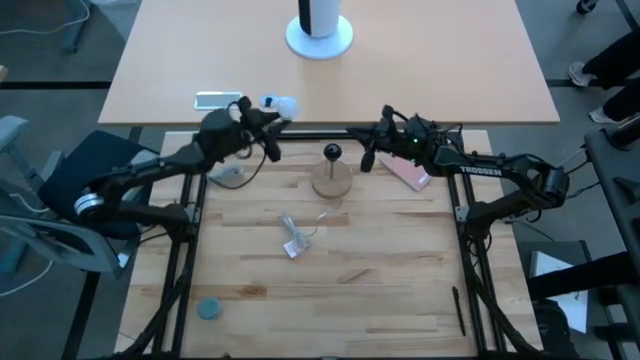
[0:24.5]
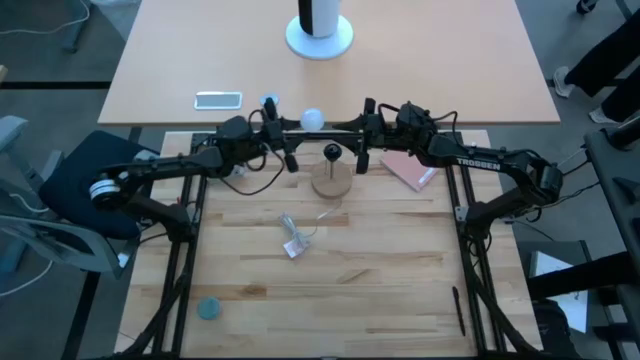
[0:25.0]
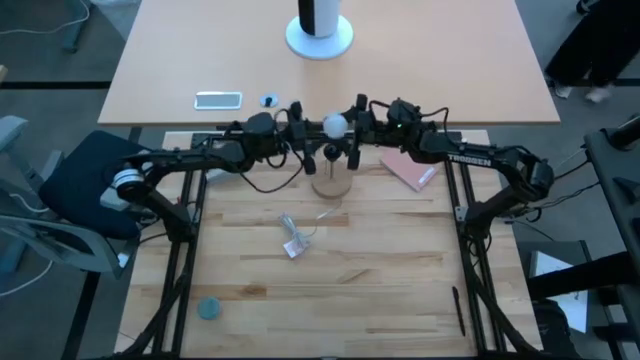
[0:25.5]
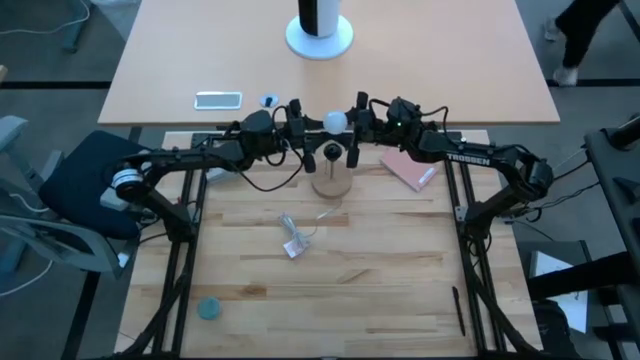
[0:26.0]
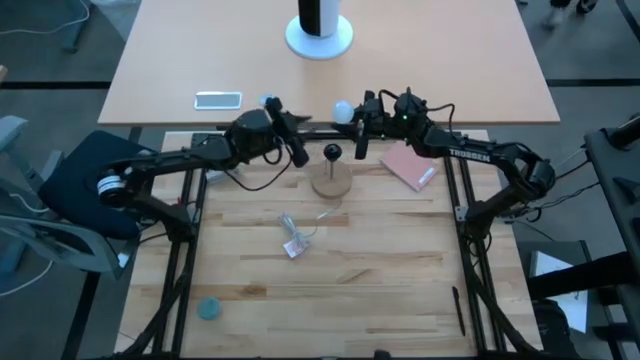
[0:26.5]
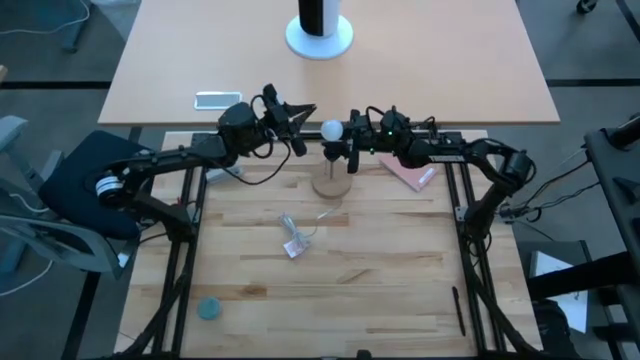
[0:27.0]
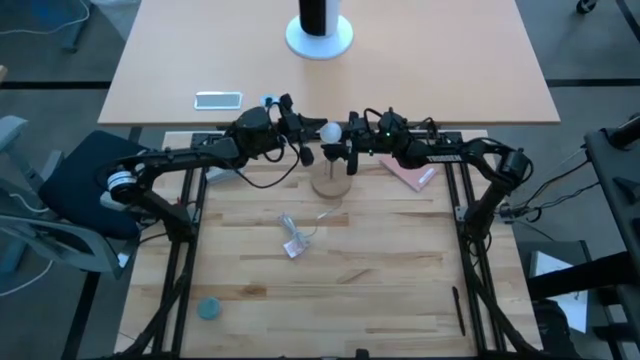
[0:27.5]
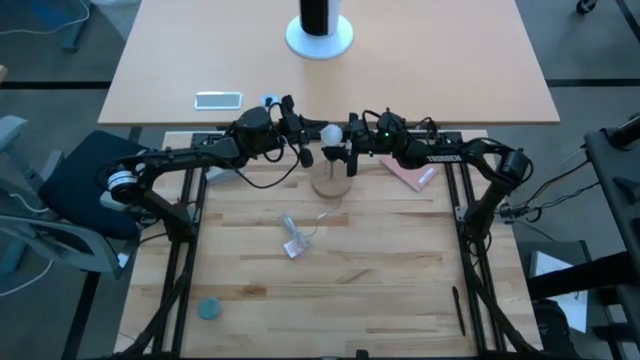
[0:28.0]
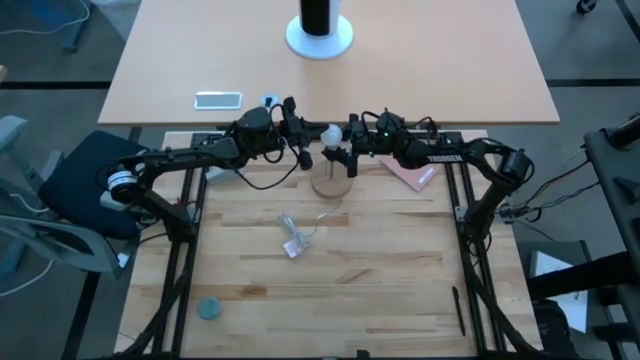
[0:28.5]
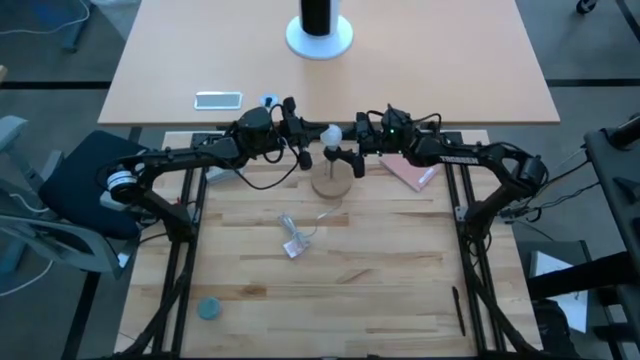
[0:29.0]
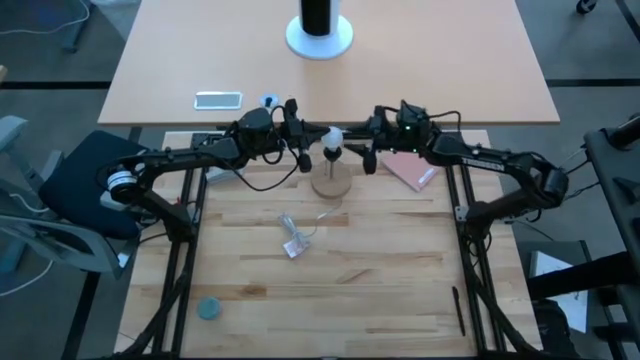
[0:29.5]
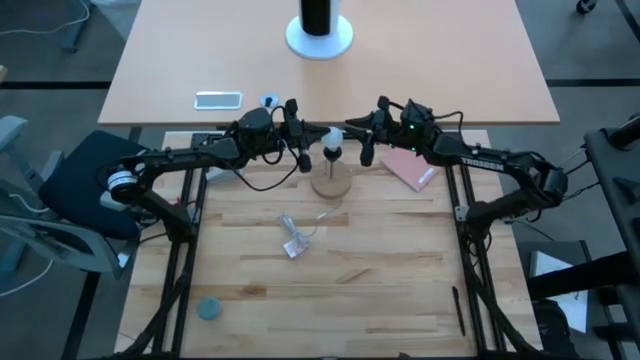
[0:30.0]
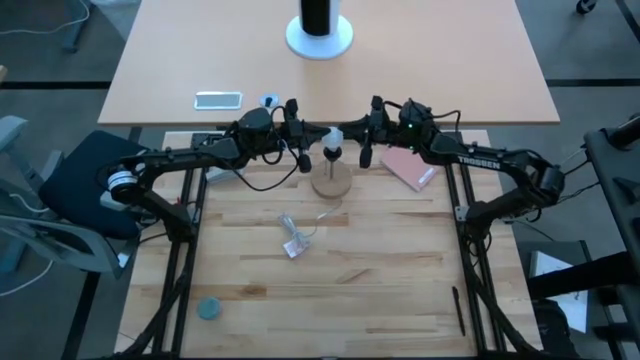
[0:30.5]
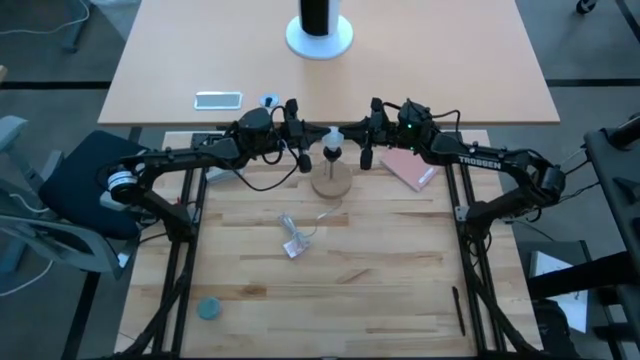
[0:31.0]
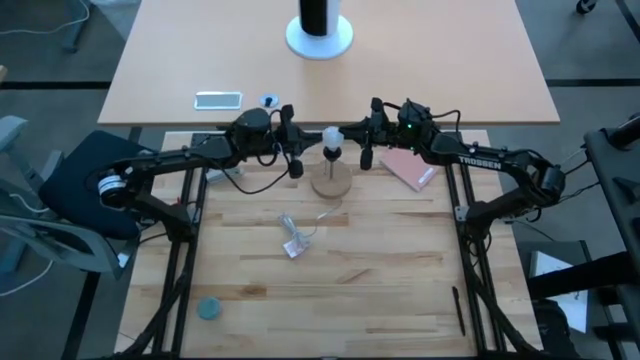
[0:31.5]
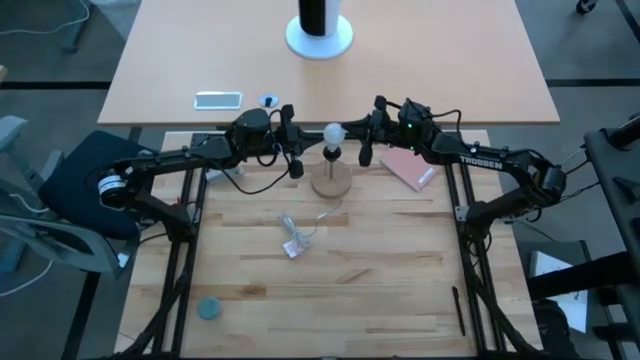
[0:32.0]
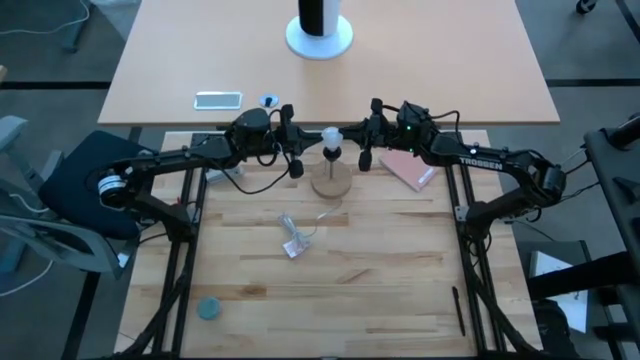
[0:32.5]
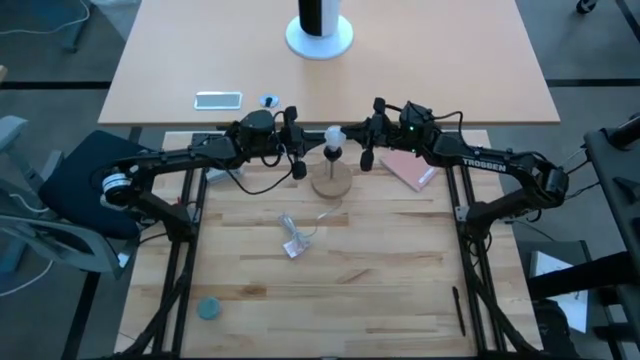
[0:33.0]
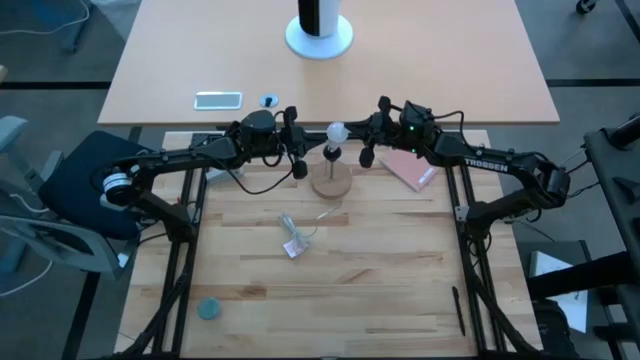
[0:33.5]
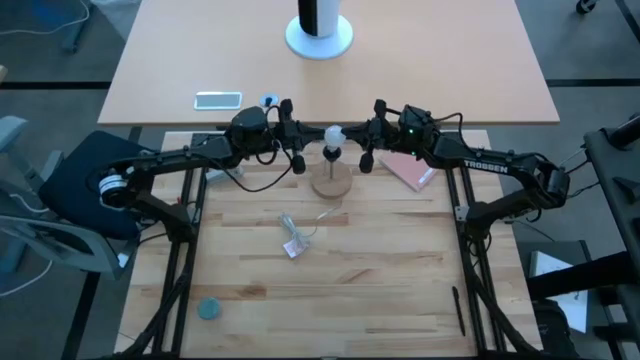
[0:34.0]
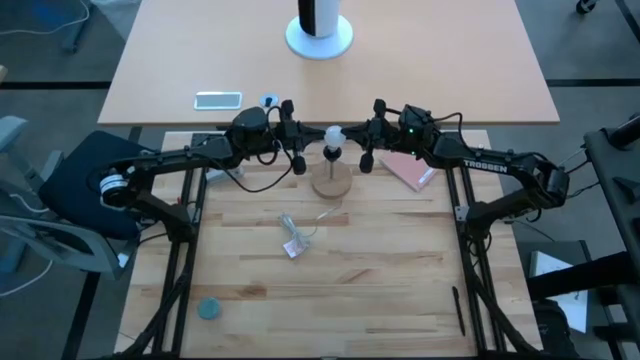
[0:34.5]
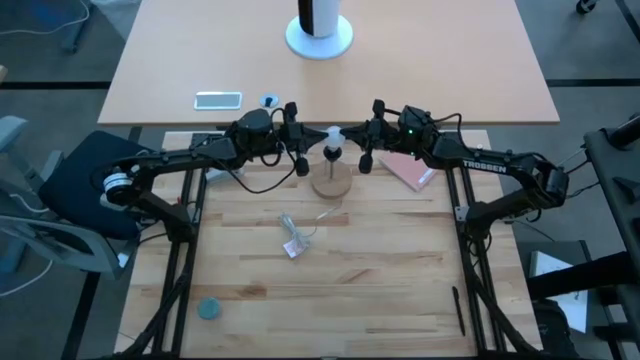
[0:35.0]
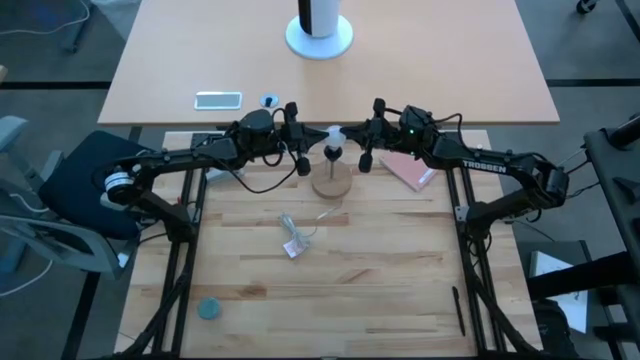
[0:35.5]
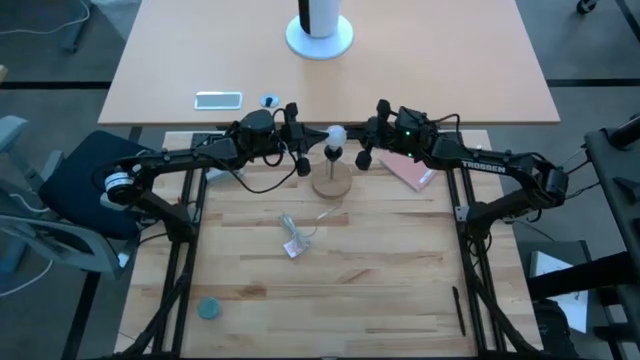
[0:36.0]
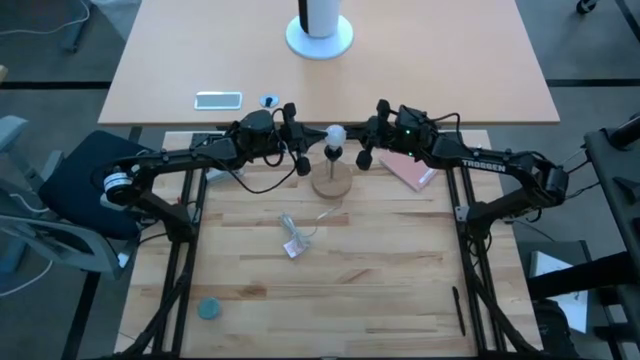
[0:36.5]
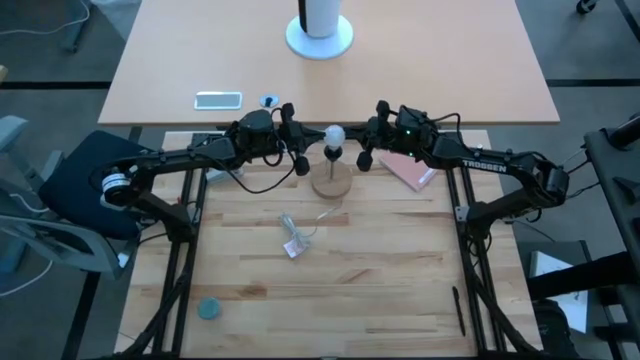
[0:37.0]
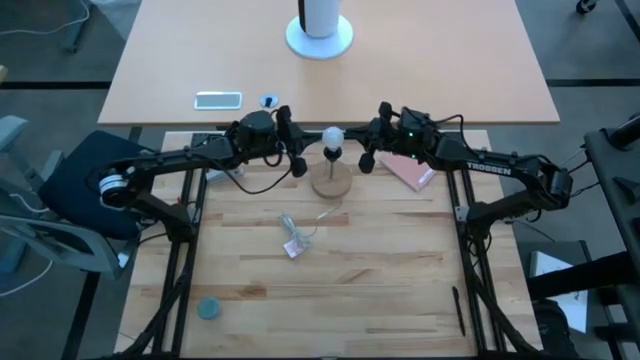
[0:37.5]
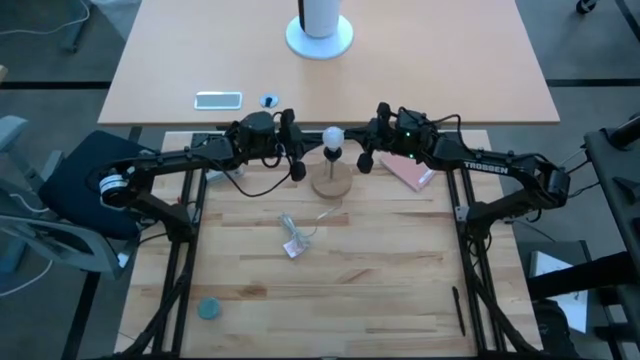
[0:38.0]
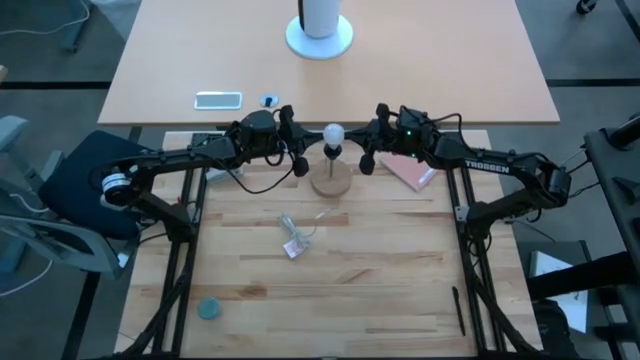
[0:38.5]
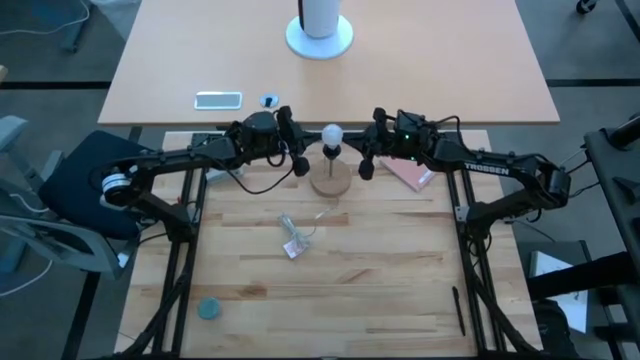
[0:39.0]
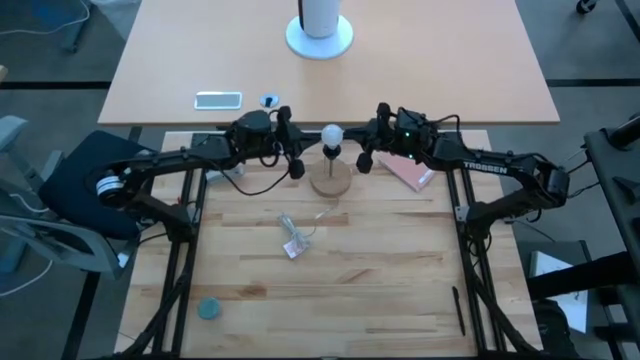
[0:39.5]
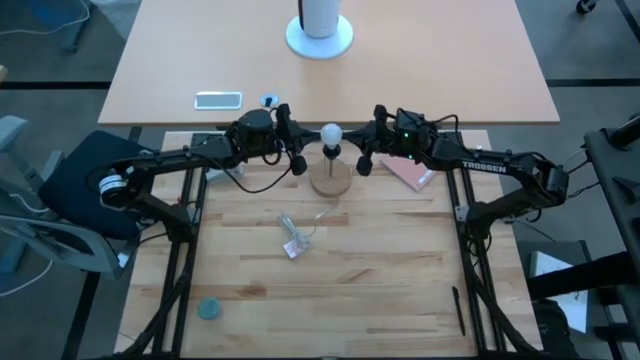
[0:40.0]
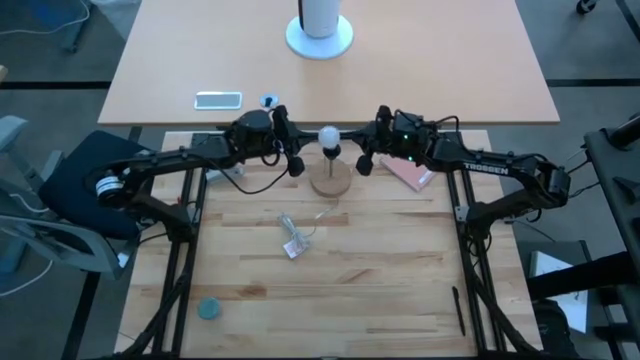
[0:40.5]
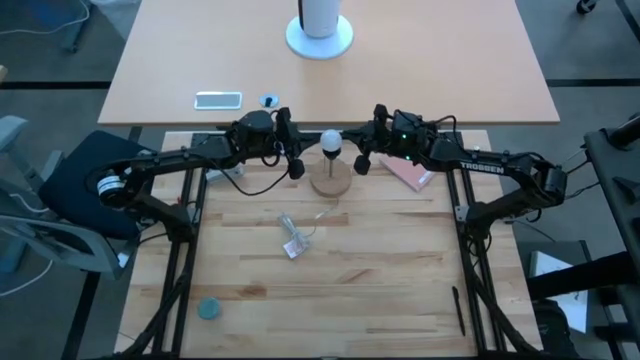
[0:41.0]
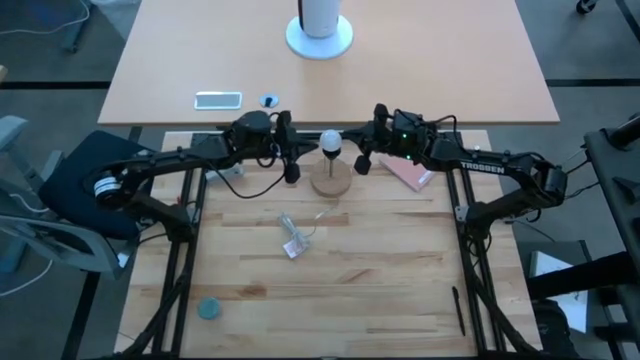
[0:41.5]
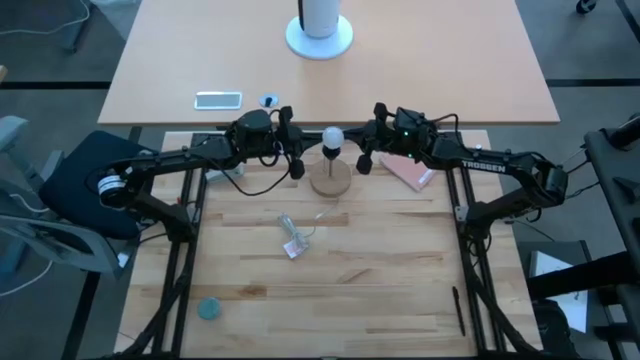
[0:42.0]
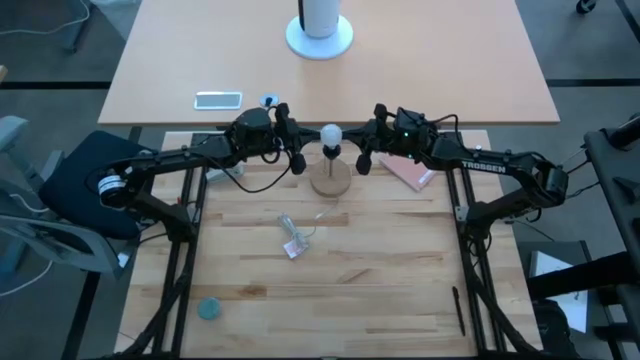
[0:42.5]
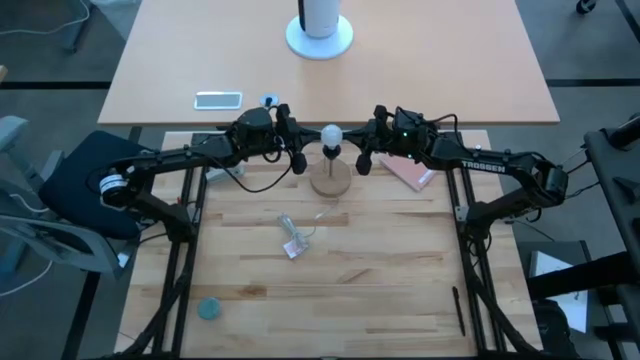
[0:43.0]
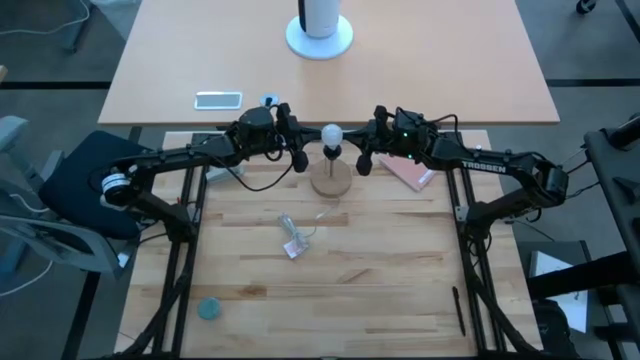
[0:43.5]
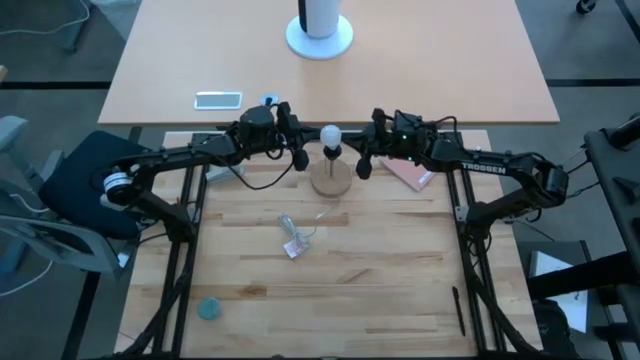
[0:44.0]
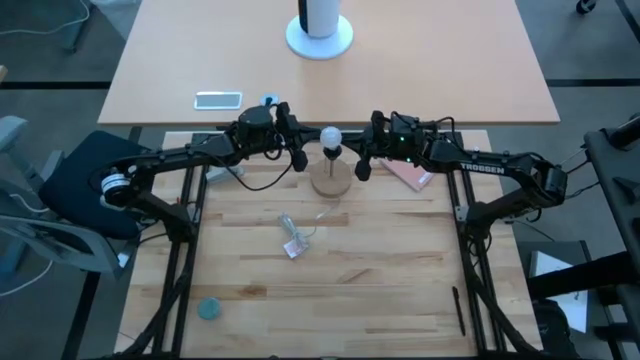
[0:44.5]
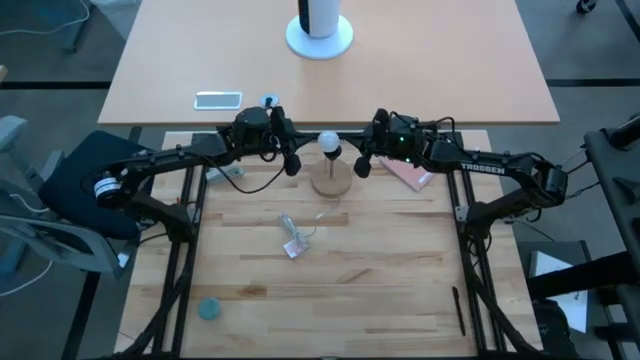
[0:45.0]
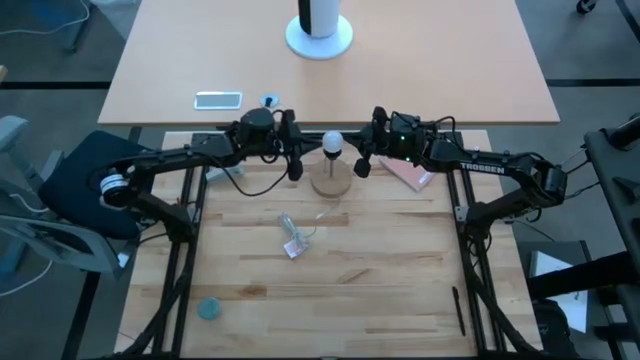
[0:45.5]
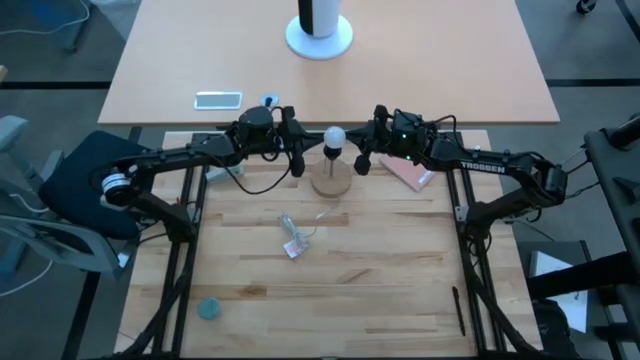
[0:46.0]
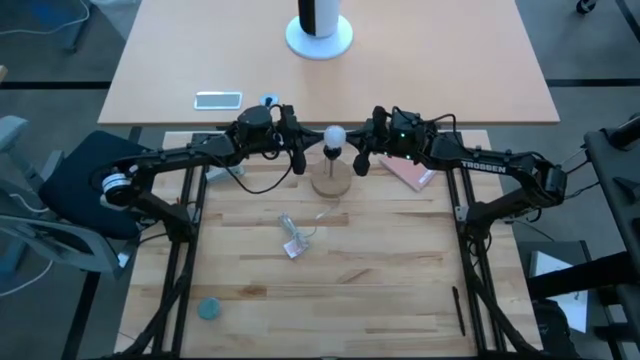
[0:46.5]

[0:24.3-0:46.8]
Task: Screw lightbulb
Insert the lightbulb on the desk lamp
